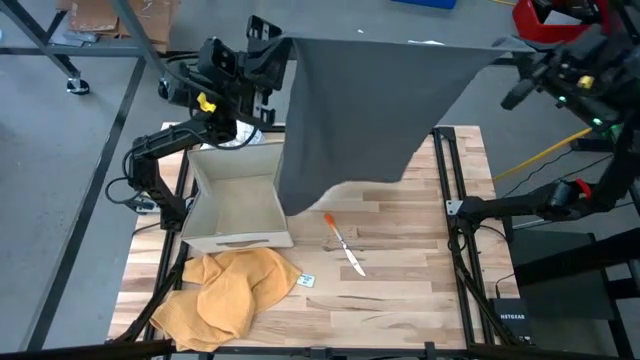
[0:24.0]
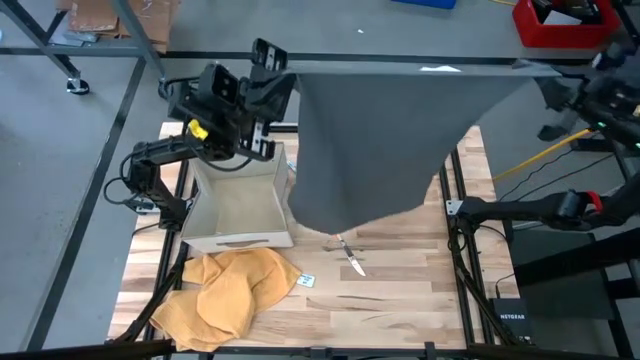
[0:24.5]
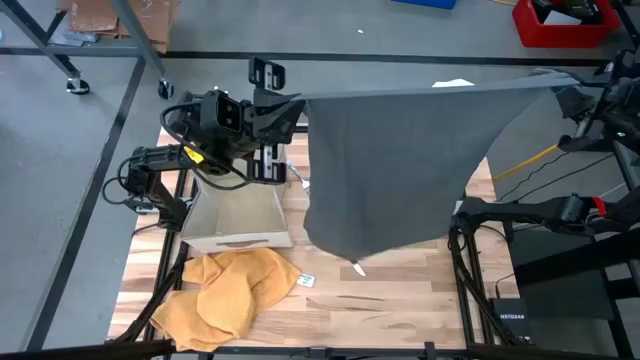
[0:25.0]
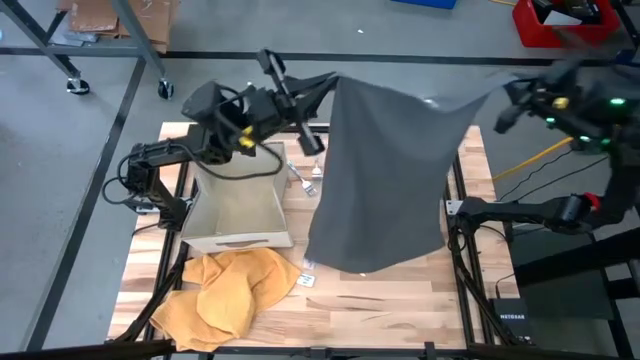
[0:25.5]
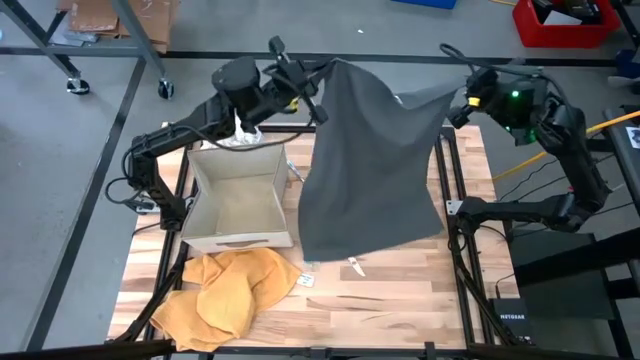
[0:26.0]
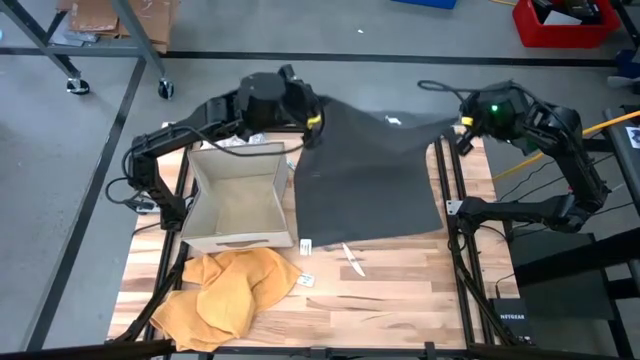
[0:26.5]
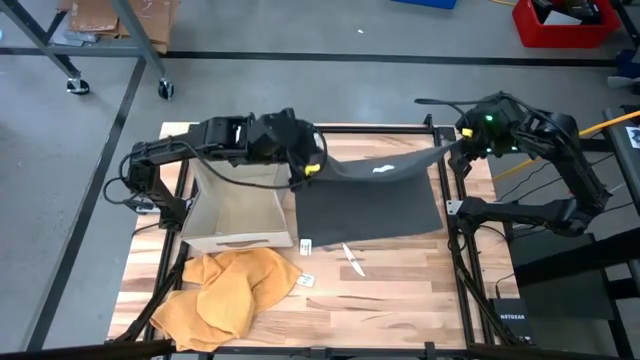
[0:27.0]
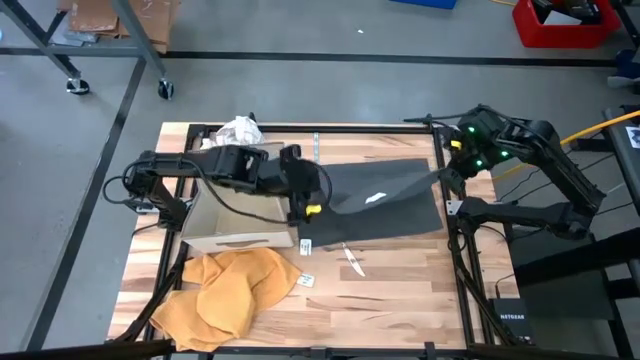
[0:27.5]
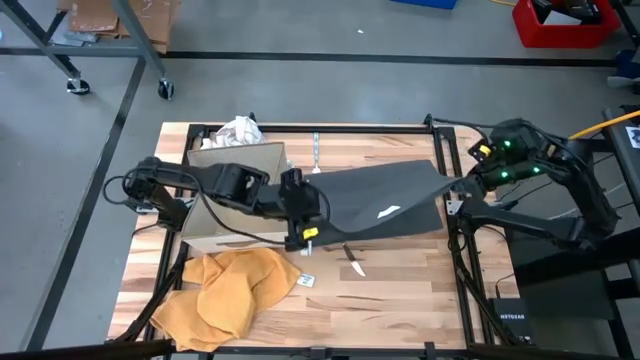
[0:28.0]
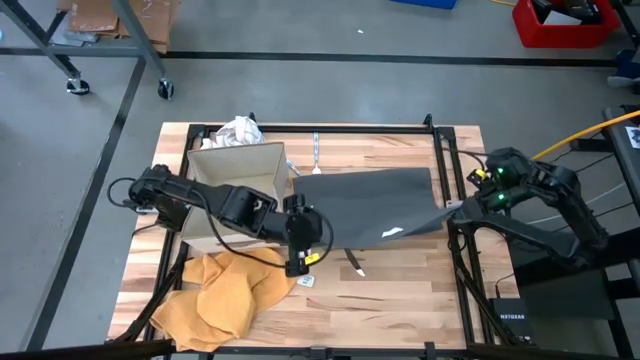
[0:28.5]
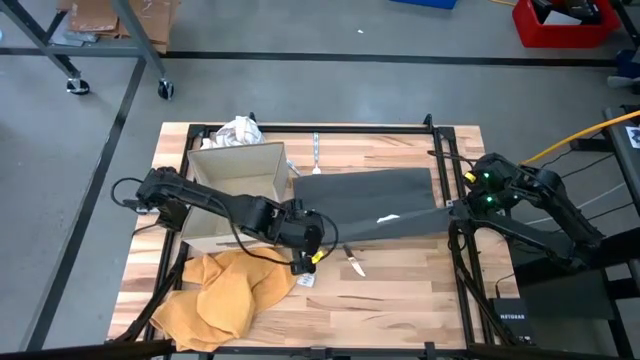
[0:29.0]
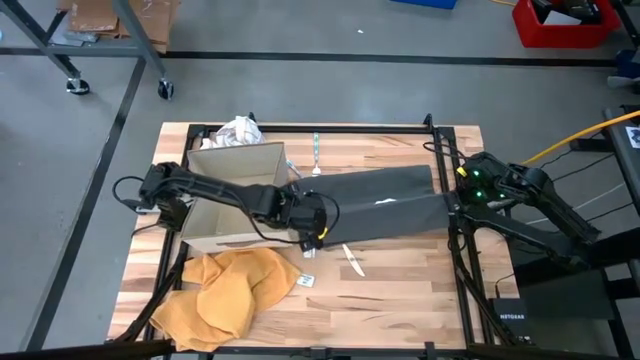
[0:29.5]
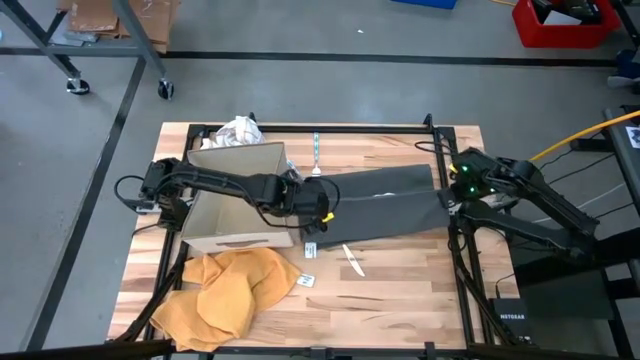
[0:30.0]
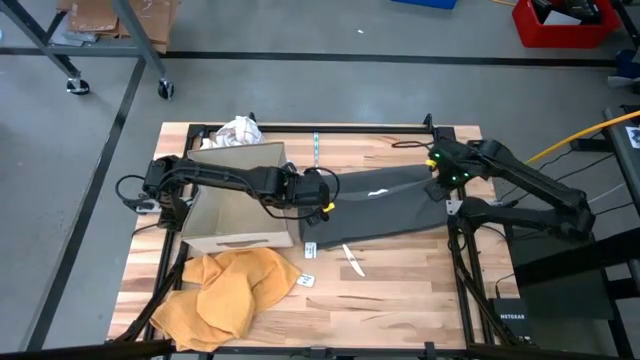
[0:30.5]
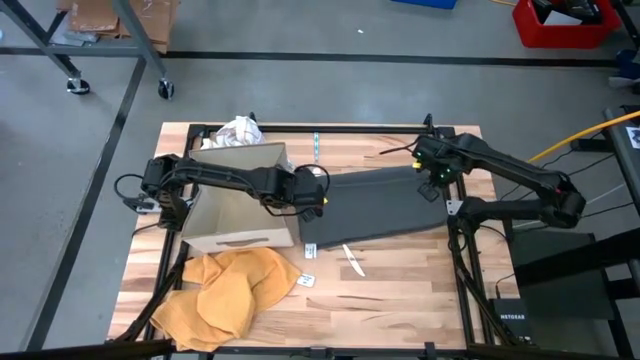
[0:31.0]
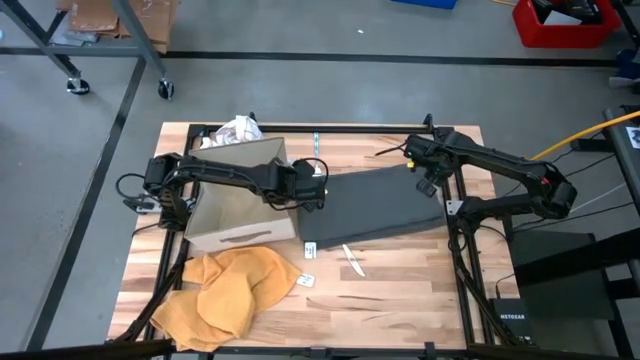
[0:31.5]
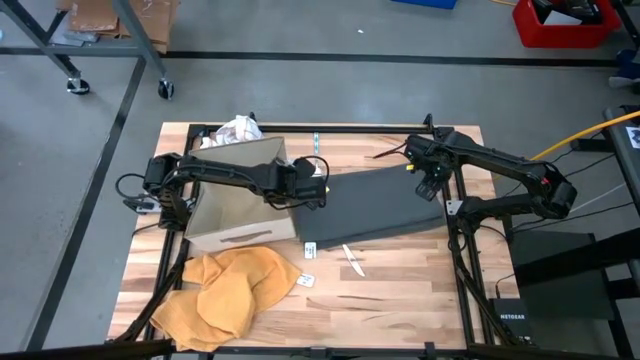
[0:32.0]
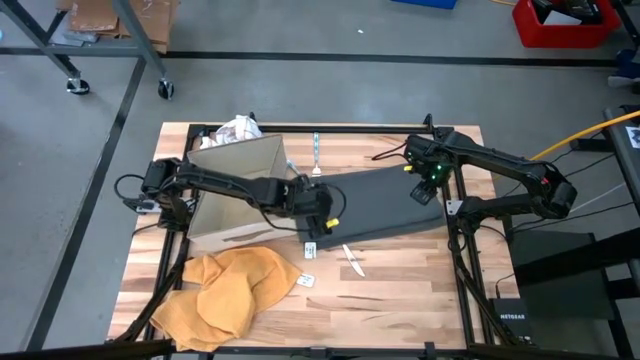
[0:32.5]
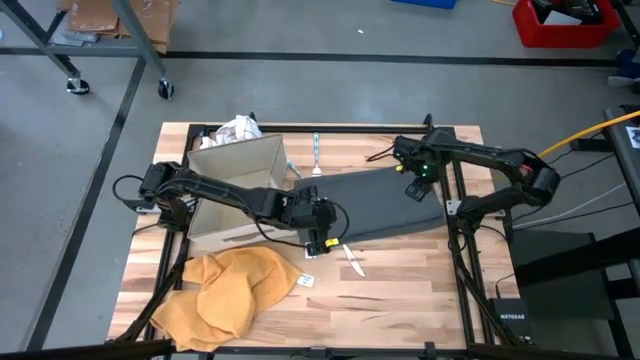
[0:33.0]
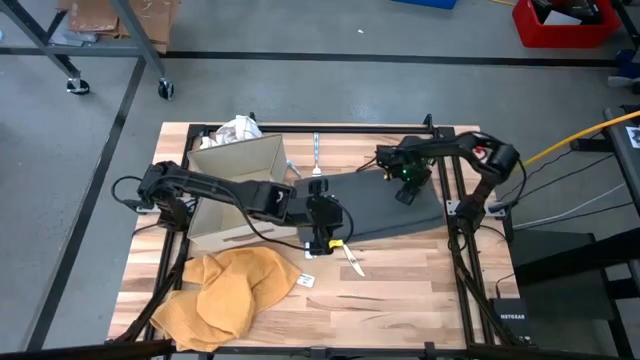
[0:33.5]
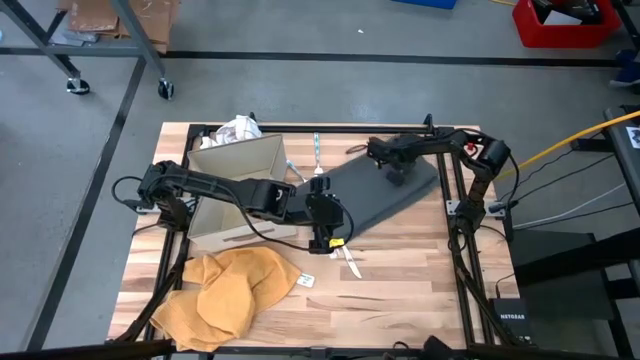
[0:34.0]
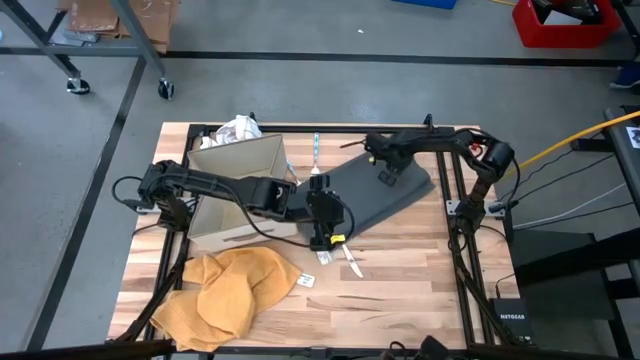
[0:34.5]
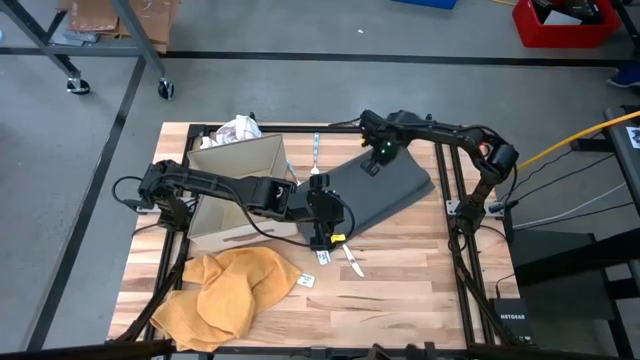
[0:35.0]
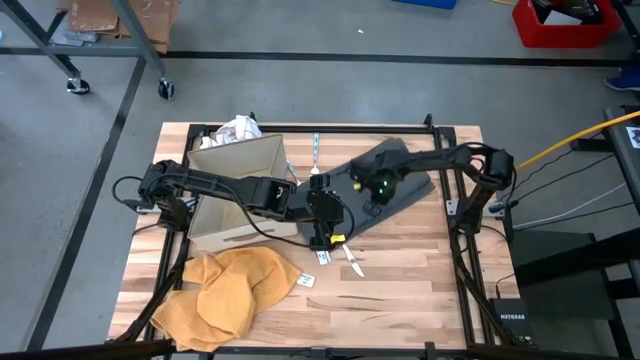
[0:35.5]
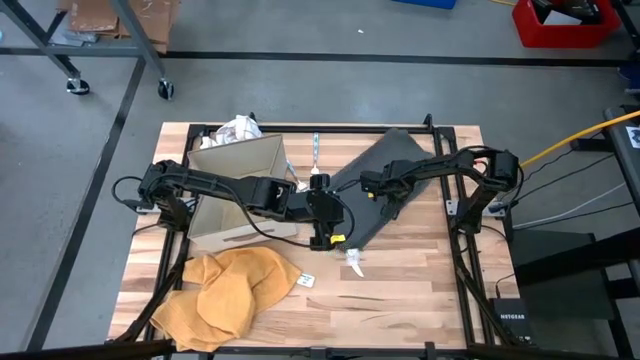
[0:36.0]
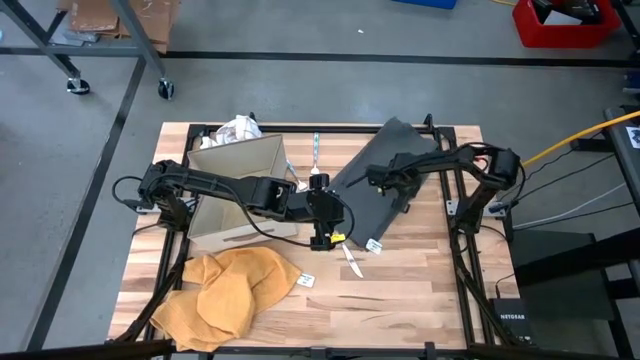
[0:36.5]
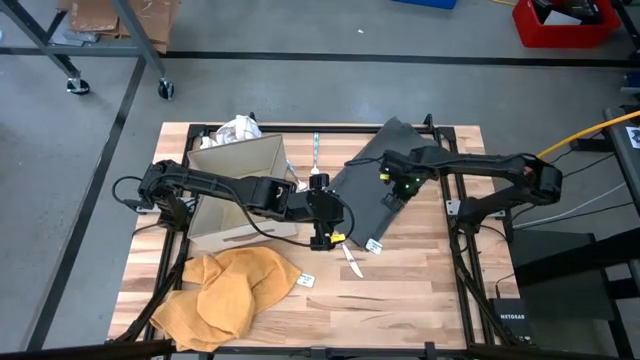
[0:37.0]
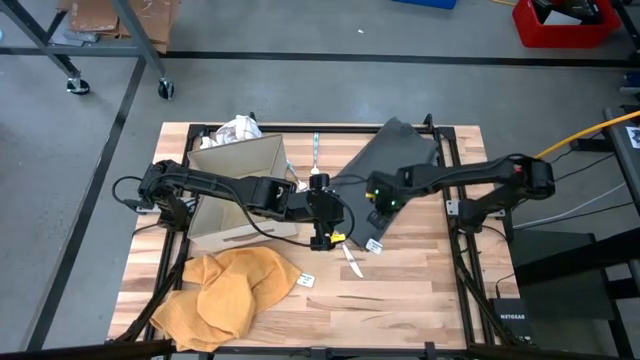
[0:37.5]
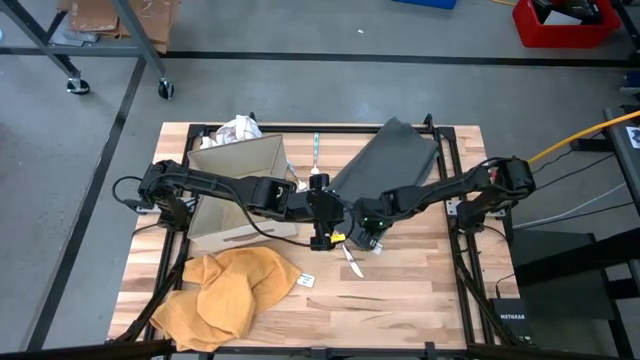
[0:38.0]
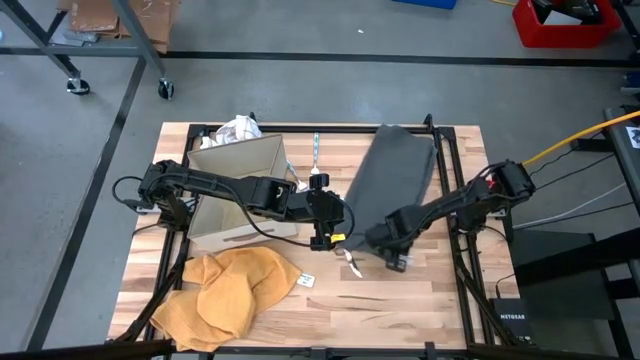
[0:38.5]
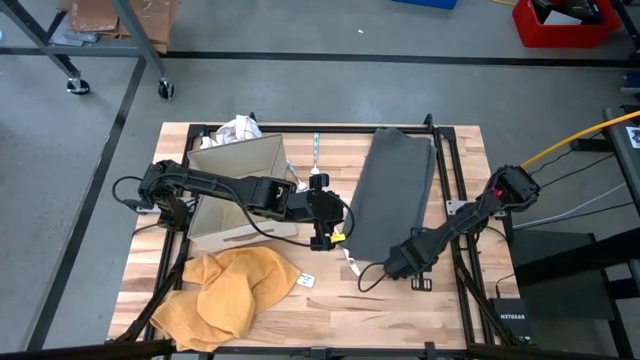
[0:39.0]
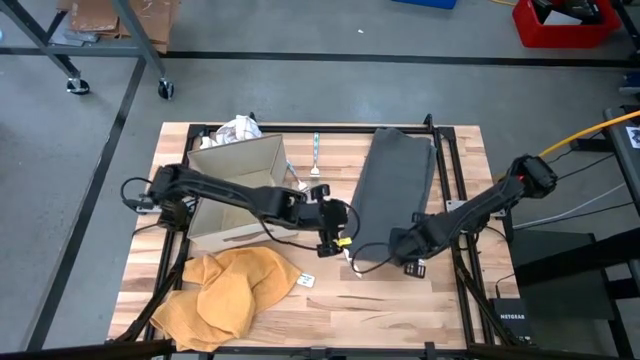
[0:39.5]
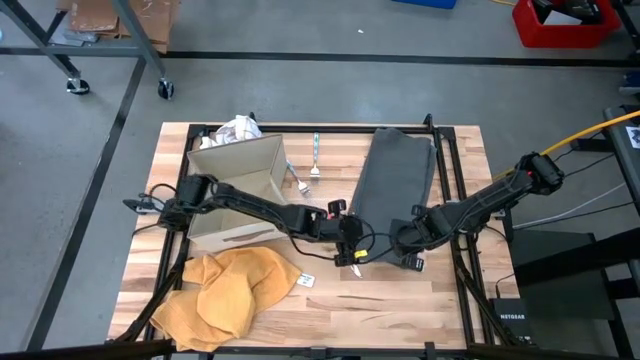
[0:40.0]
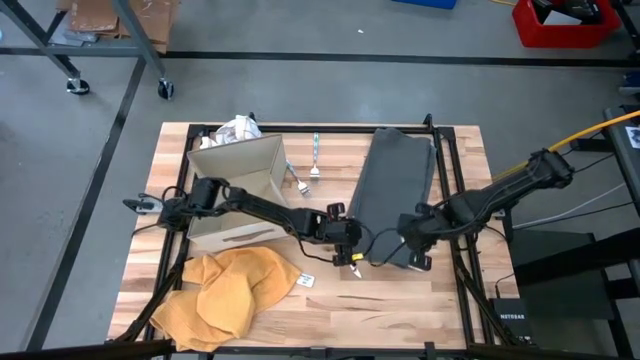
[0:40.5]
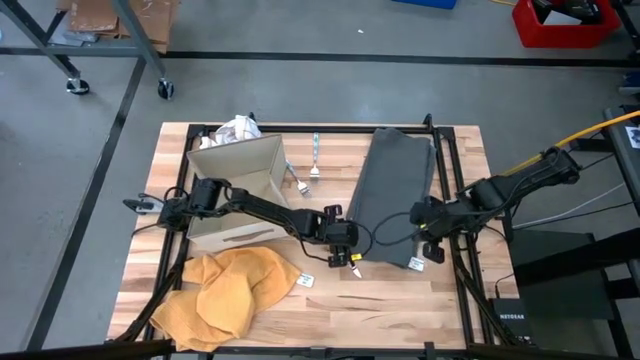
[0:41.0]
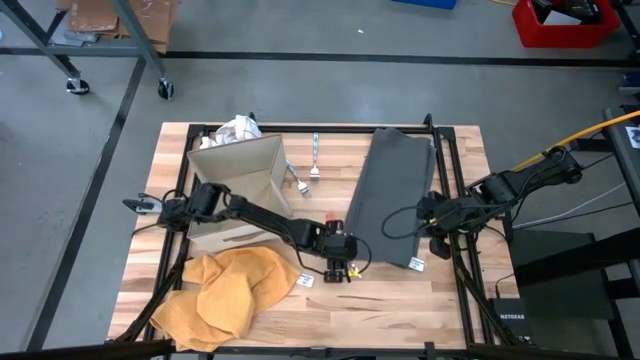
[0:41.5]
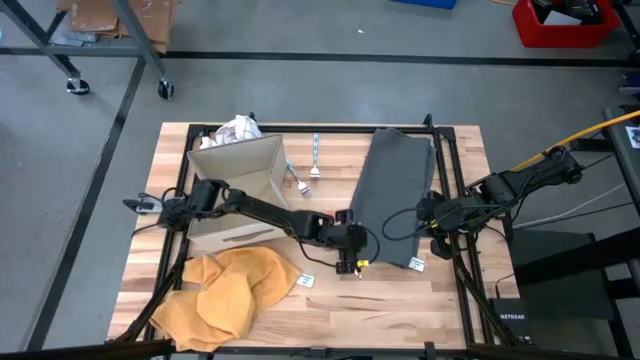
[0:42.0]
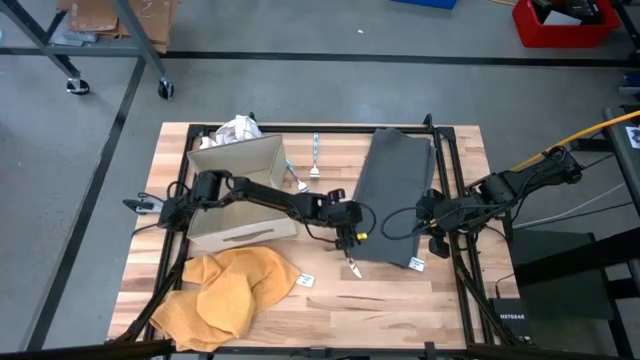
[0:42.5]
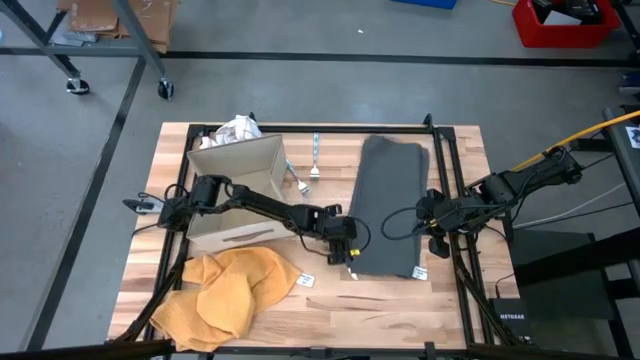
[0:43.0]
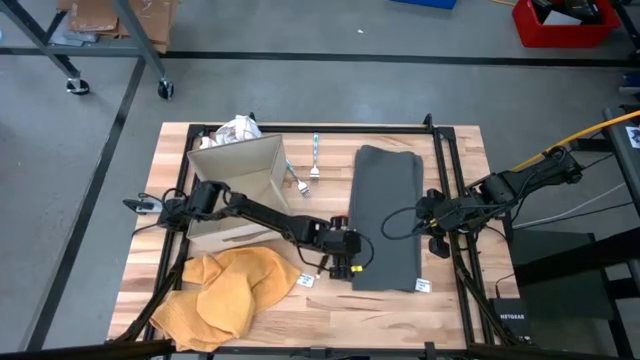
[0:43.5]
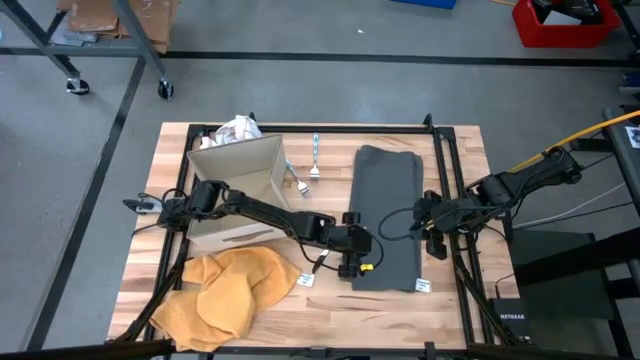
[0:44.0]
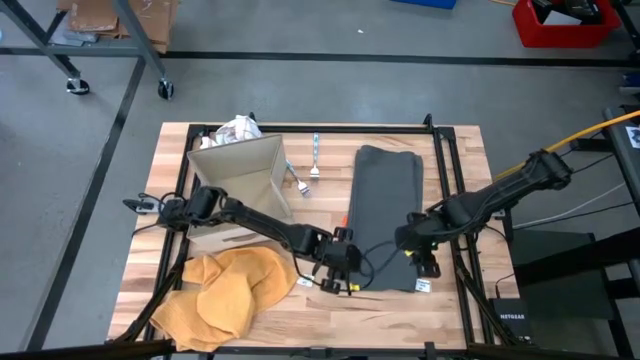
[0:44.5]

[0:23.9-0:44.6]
Task: Fold towel
Fold the gray kitchen towel
